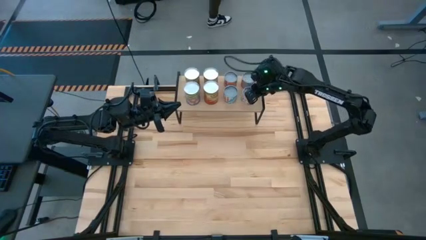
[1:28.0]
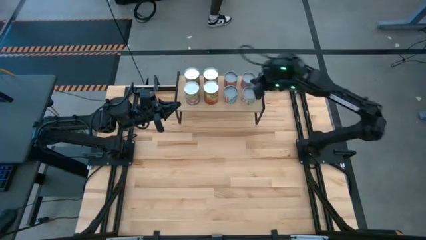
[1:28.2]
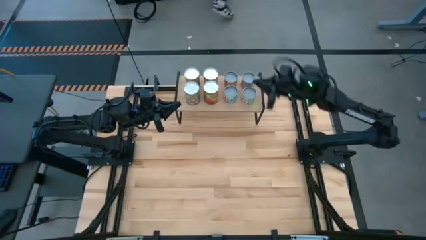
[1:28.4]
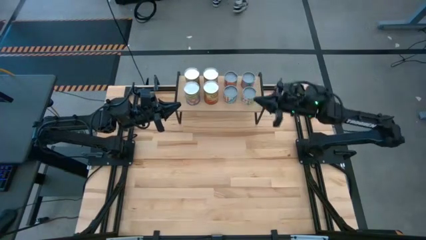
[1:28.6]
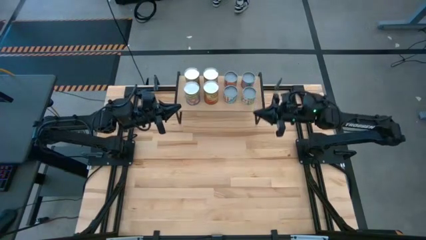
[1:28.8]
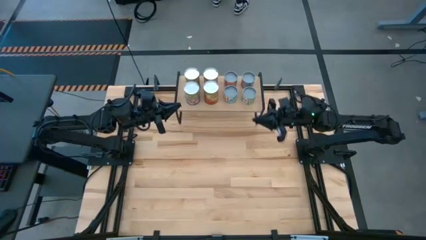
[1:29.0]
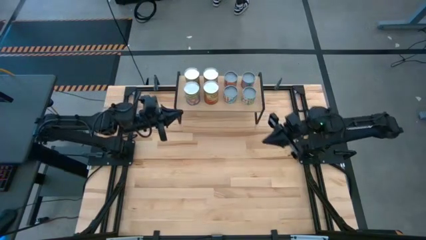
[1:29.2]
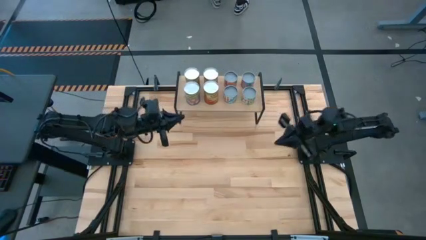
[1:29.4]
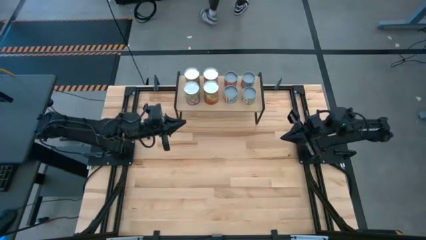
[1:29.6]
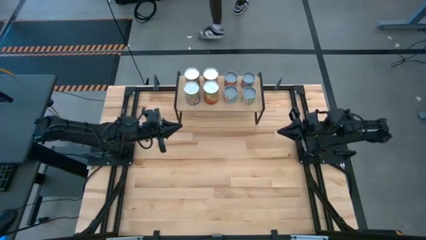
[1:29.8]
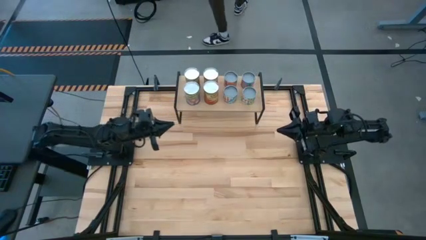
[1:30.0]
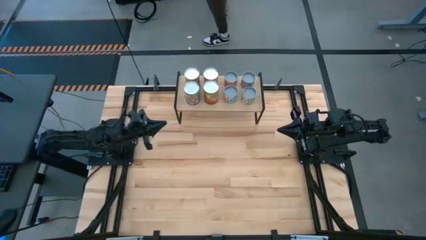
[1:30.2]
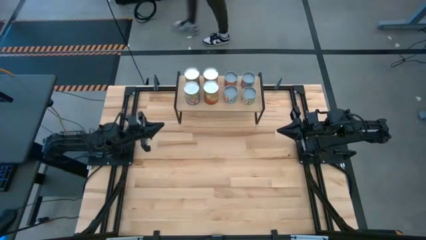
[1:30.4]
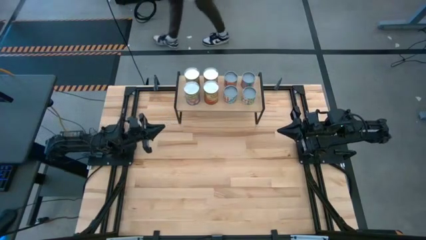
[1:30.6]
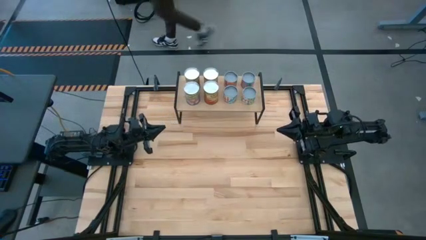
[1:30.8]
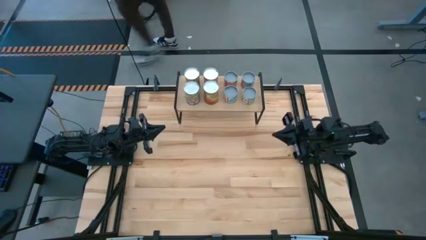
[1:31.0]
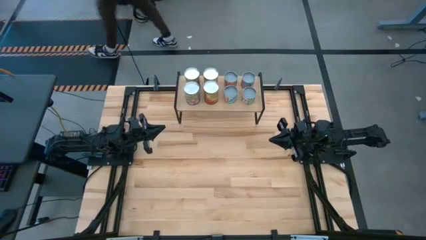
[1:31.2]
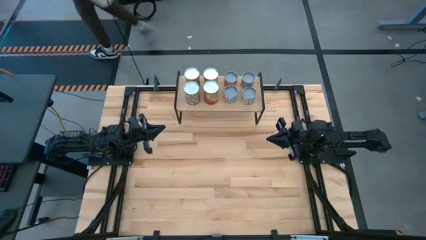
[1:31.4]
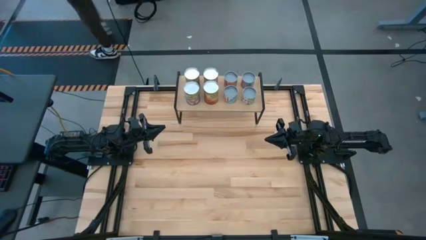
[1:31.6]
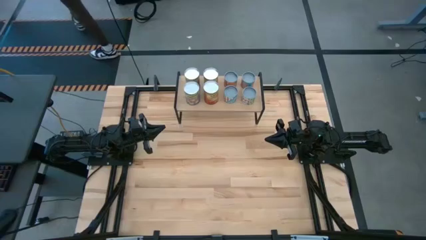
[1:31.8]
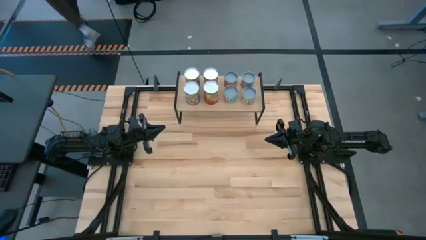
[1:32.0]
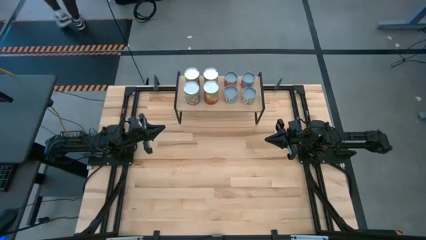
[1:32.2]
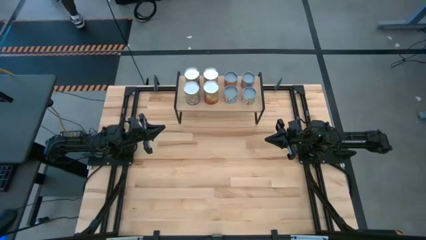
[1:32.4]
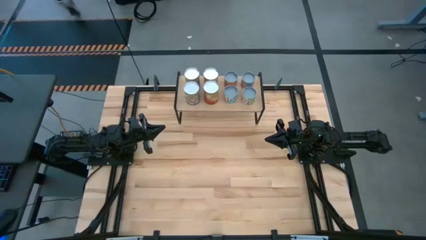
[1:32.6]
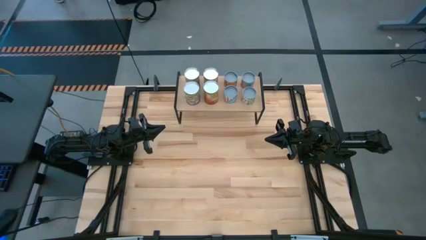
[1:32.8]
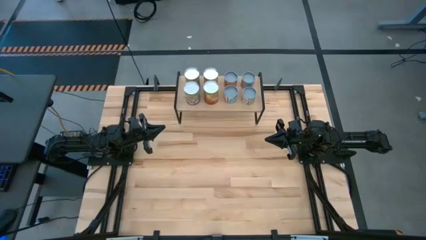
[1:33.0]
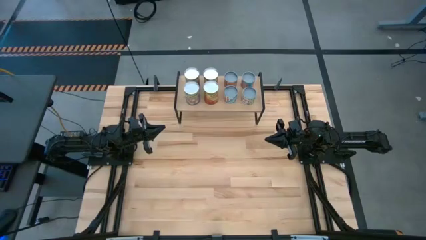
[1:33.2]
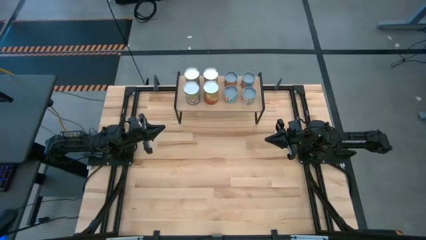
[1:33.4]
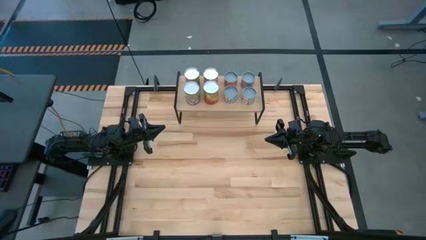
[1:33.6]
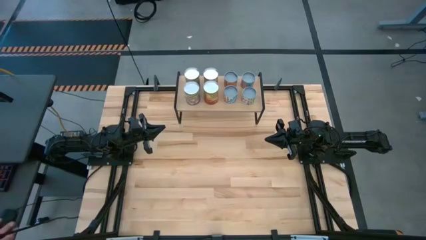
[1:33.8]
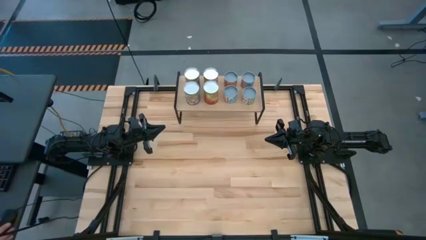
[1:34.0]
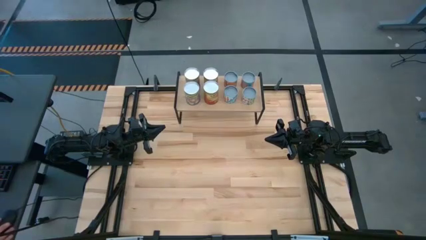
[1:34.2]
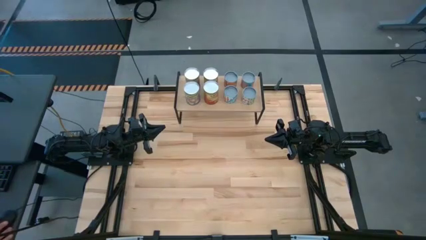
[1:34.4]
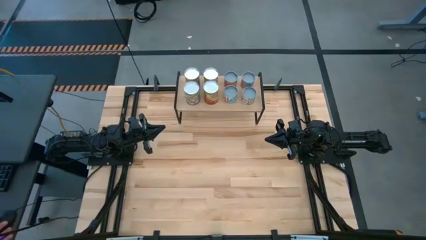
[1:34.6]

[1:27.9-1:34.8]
Task: Pick and place cans onto a shelf
Return to Home Position

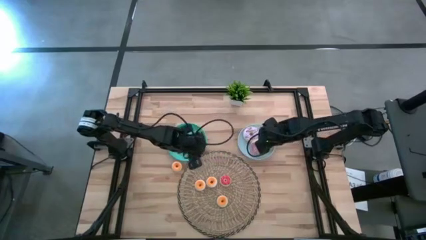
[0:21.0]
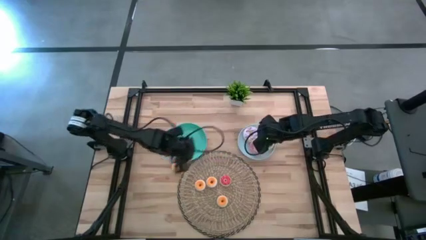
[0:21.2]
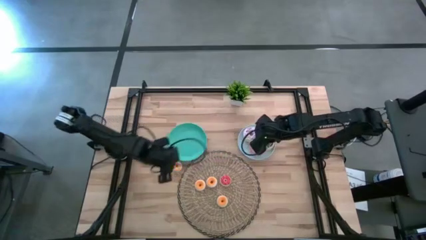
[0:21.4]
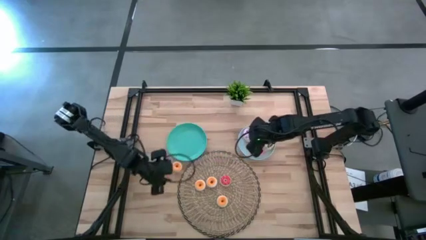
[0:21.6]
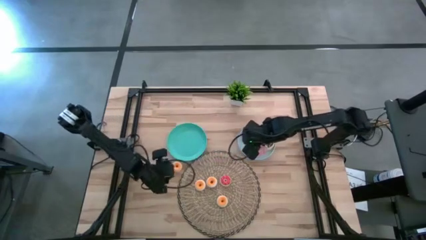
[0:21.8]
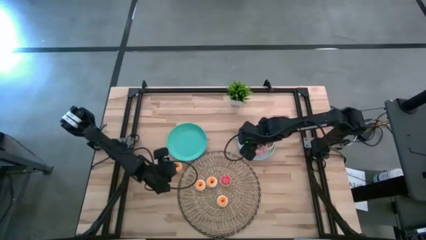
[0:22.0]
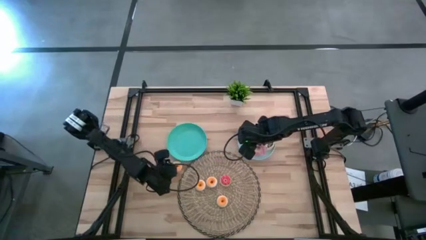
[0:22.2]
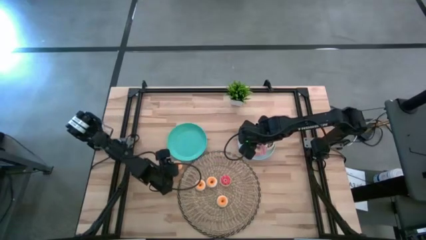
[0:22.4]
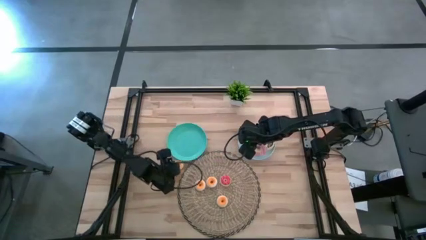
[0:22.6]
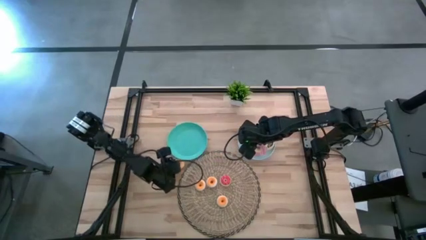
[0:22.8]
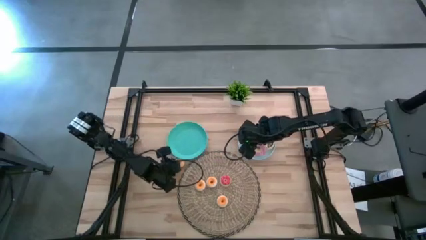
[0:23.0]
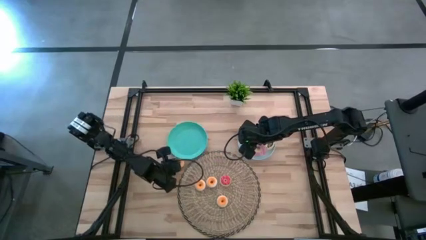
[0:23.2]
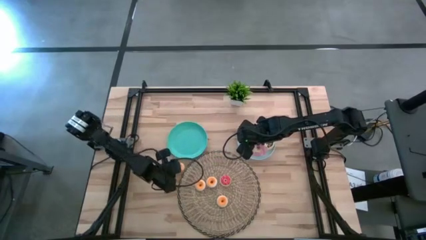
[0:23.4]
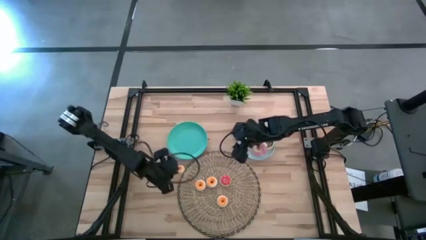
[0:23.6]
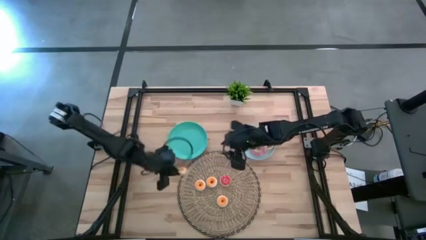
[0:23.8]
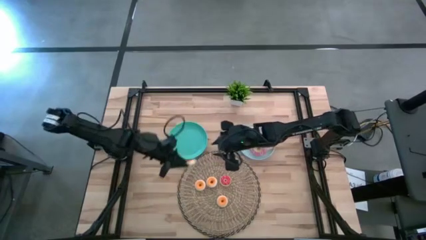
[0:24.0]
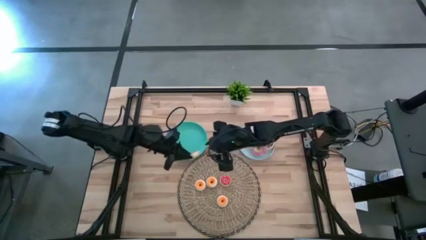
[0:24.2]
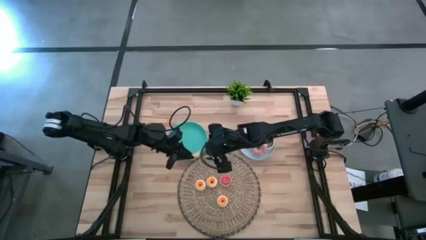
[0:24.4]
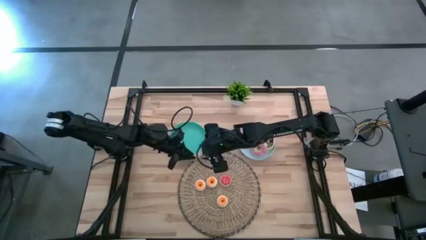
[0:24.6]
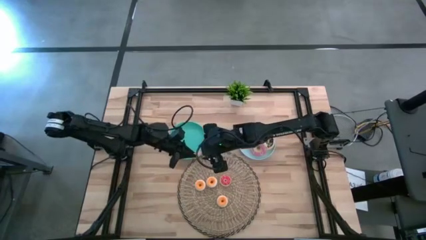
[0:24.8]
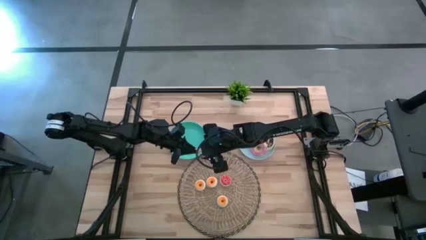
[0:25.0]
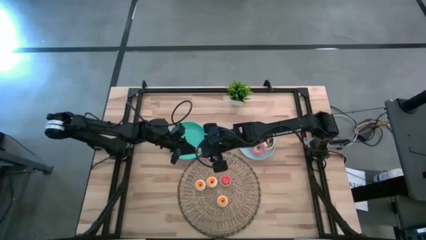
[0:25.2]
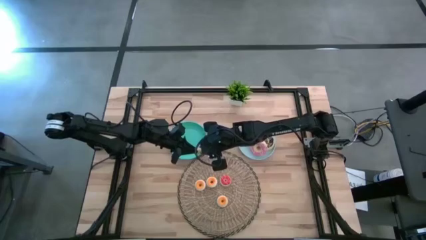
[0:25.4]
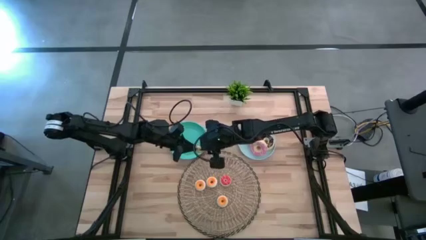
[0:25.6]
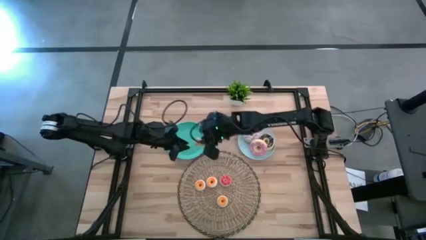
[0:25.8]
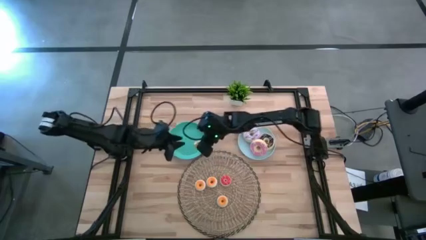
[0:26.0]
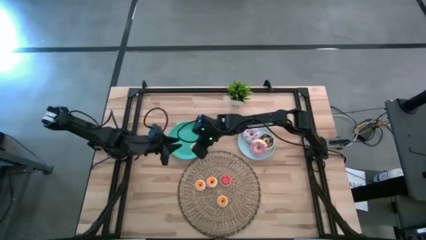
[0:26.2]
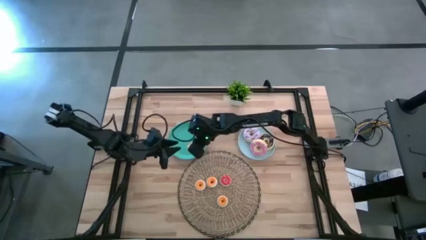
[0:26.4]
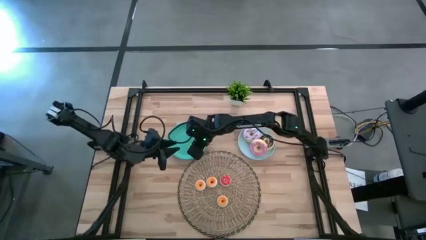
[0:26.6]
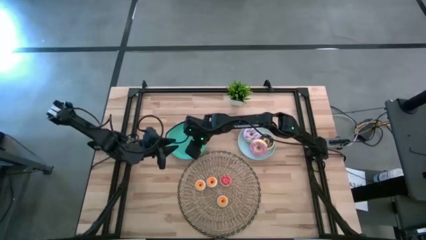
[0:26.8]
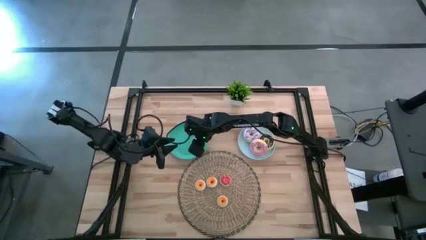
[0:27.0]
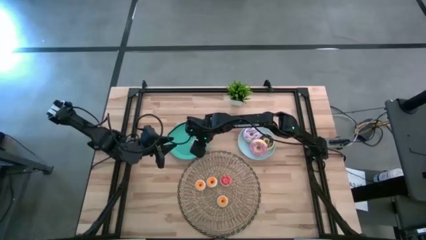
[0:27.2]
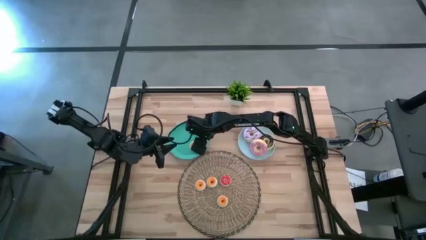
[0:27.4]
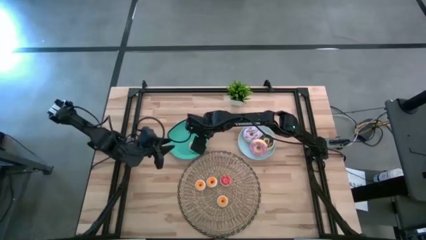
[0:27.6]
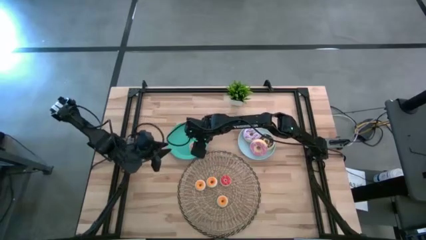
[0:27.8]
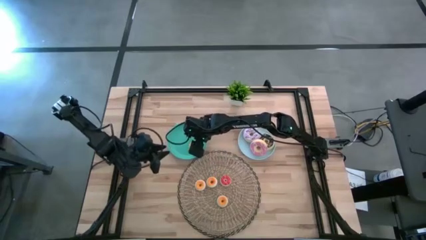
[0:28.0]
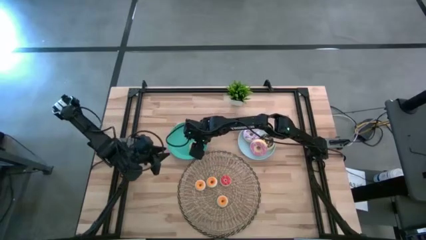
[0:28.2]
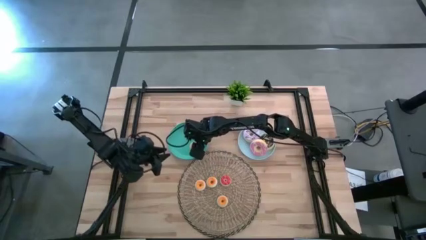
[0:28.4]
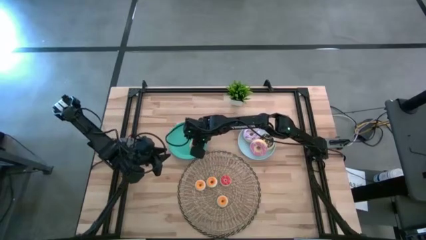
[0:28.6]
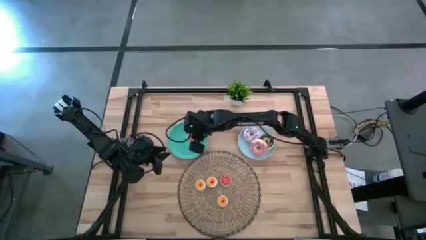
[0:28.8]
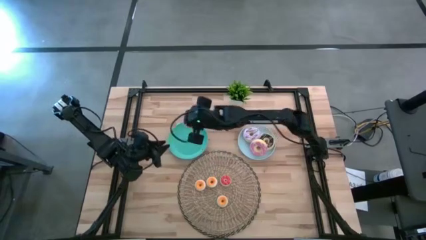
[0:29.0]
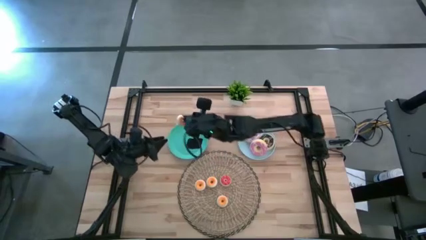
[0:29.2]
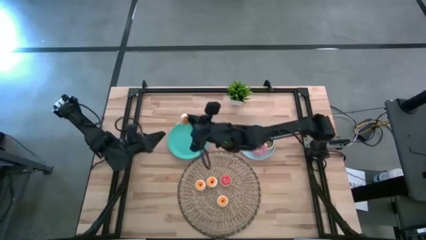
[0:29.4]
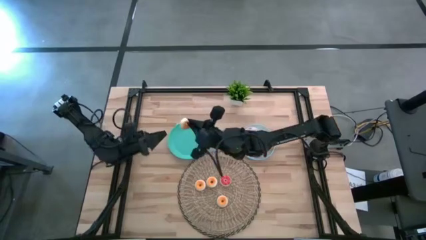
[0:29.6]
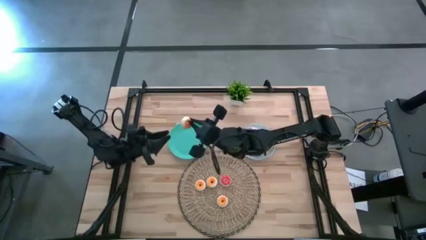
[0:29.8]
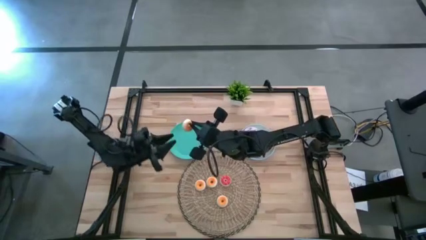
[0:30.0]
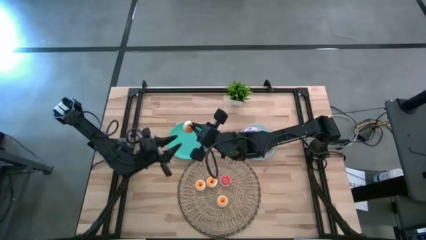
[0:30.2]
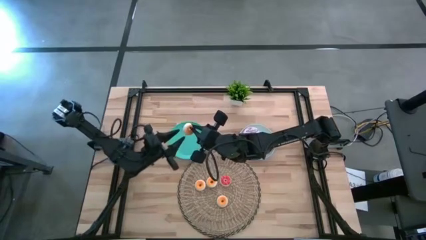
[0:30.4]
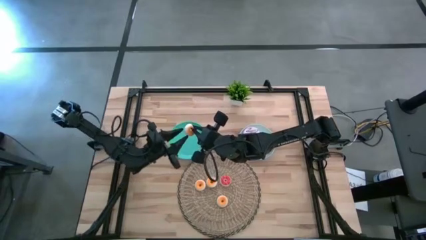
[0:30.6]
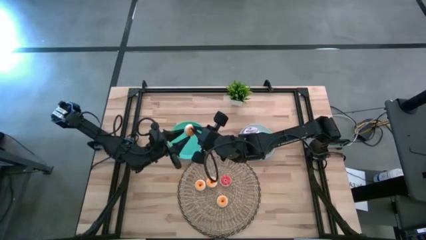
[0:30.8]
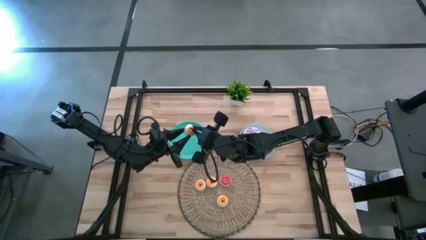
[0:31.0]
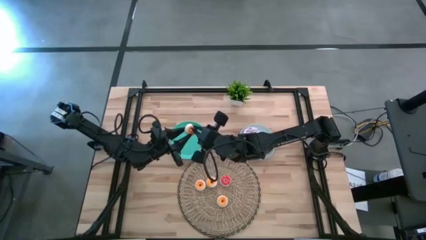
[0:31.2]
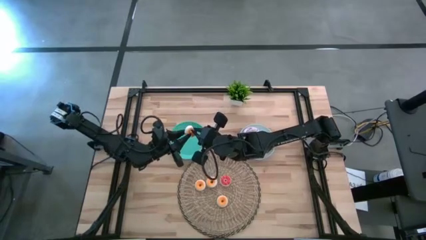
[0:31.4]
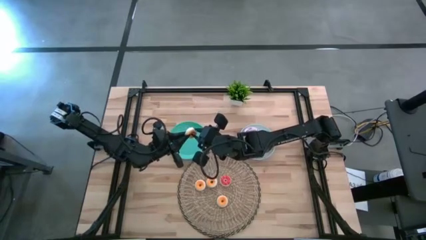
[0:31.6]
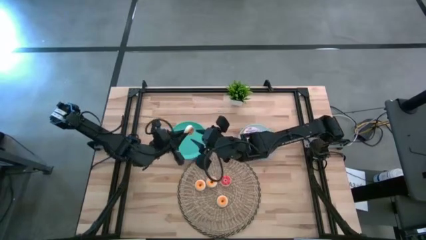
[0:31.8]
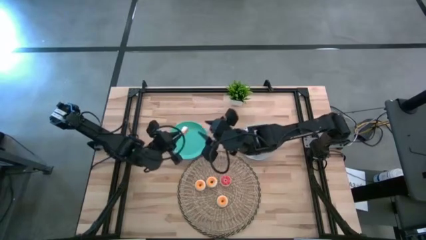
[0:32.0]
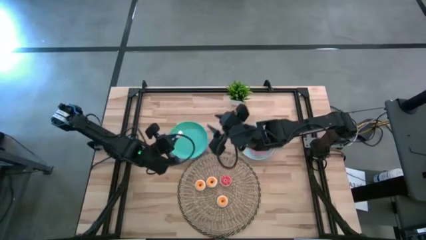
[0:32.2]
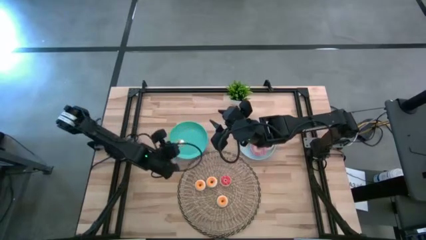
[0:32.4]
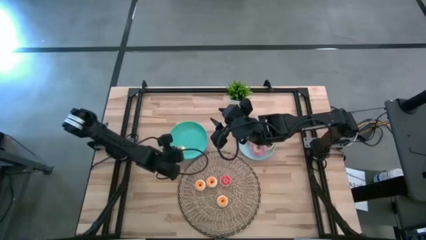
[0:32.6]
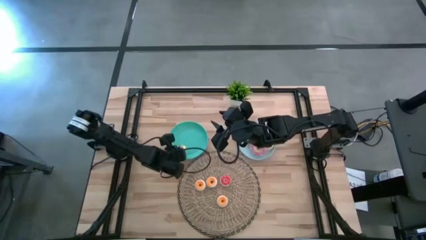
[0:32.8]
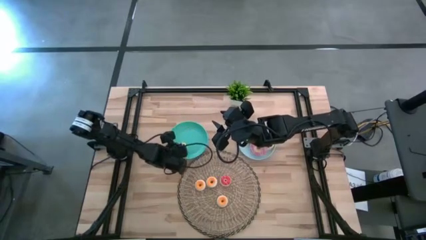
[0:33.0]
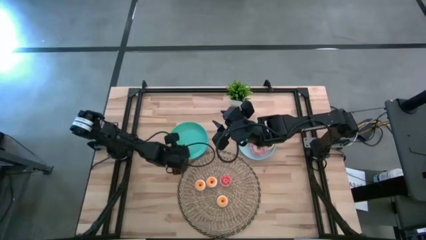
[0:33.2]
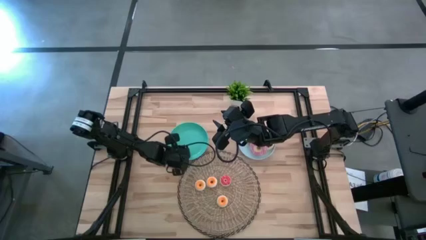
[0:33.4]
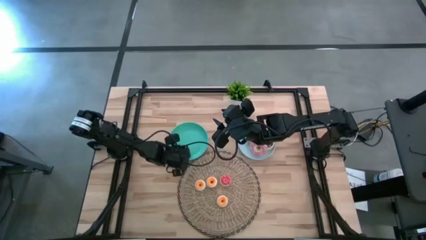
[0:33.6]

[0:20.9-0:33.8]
Task: Pick & Place donuts
Put the small yellow doughnut on the green plate
